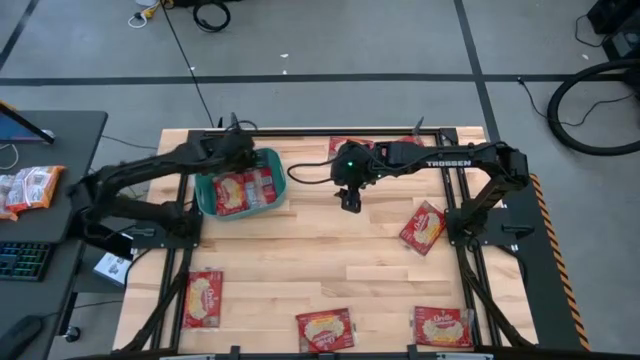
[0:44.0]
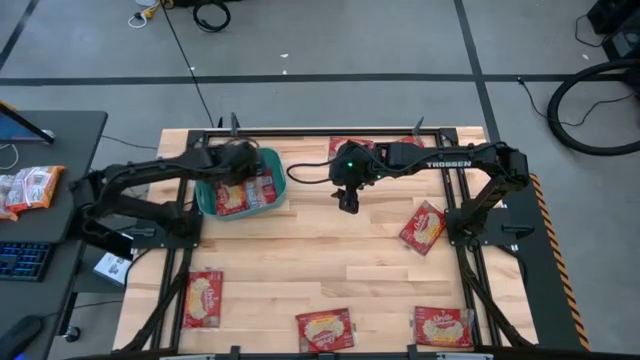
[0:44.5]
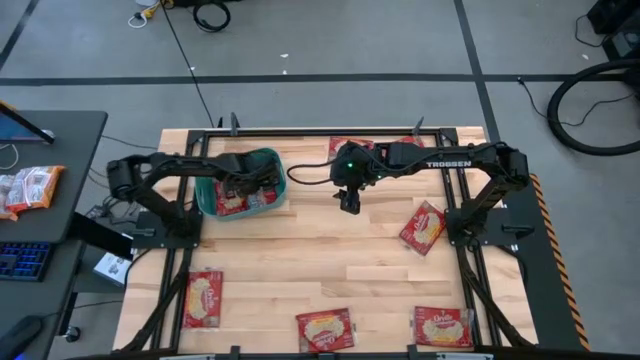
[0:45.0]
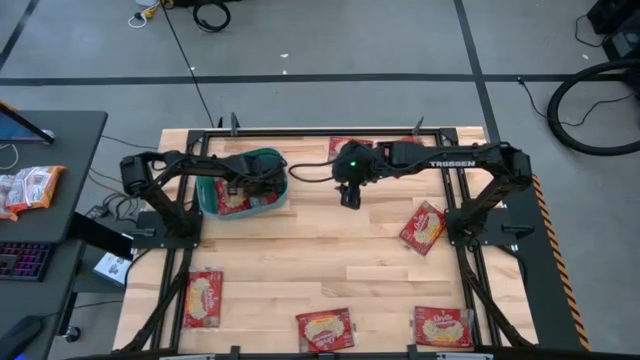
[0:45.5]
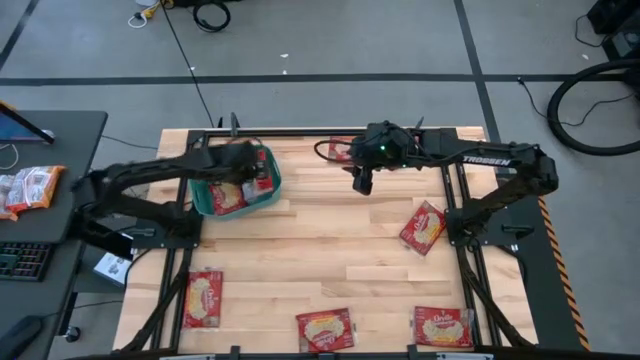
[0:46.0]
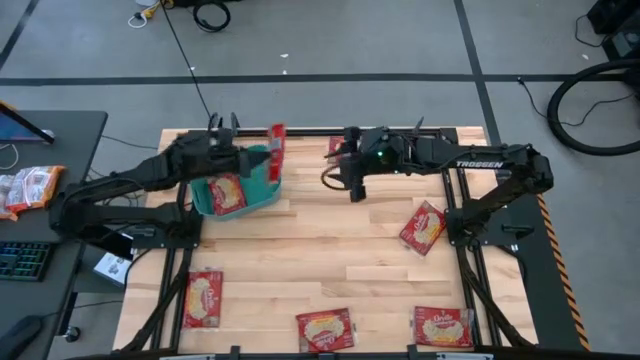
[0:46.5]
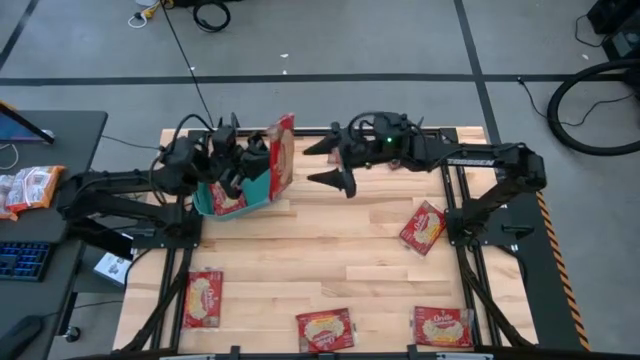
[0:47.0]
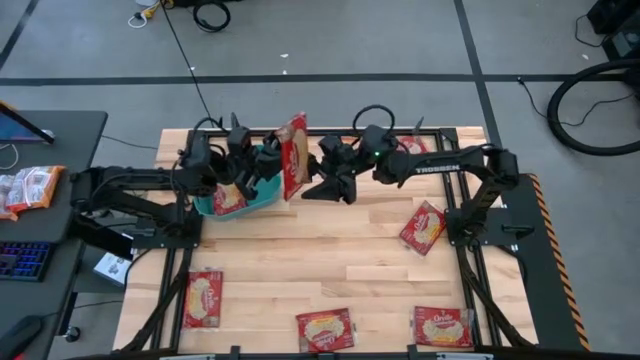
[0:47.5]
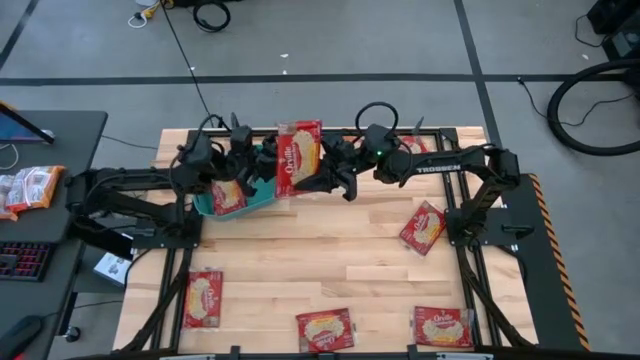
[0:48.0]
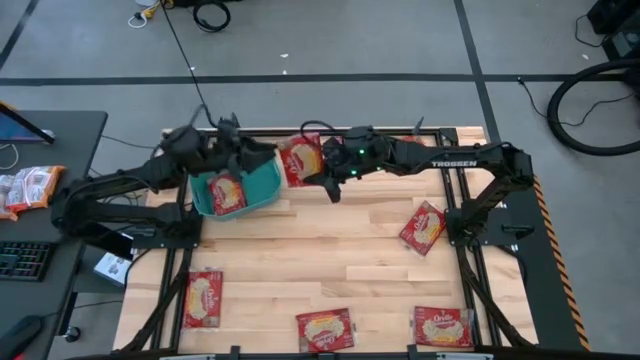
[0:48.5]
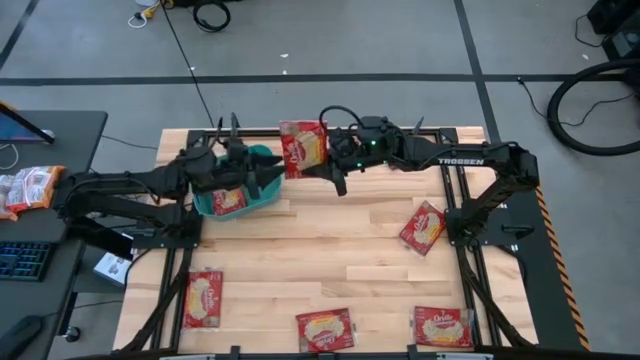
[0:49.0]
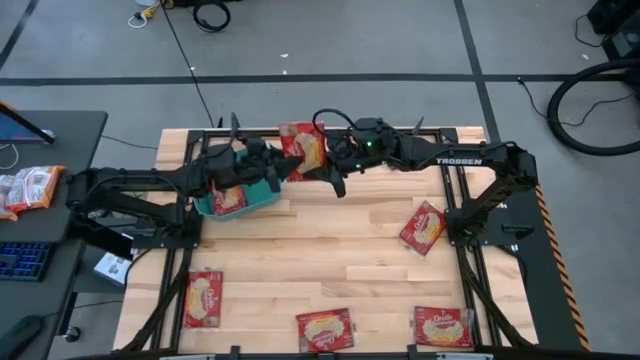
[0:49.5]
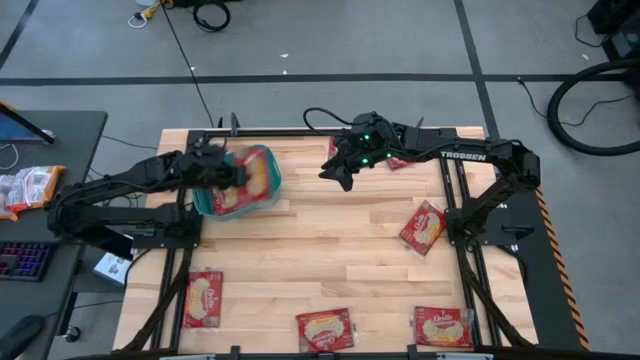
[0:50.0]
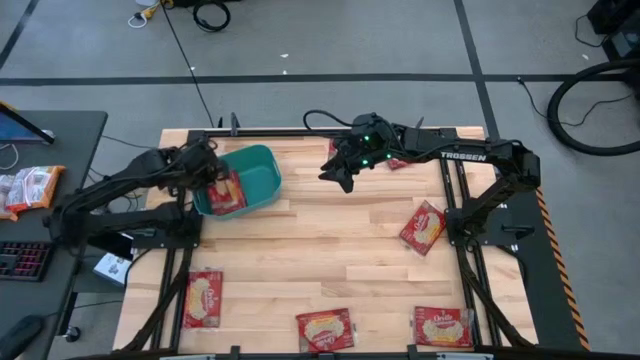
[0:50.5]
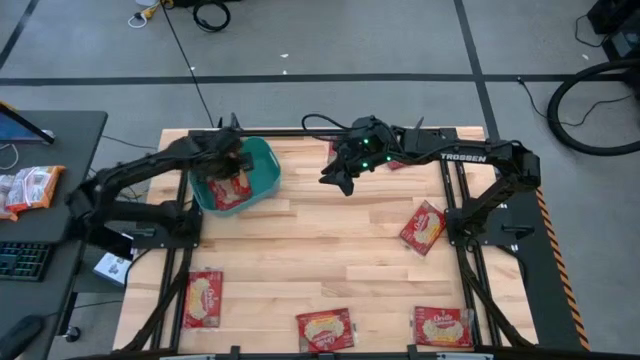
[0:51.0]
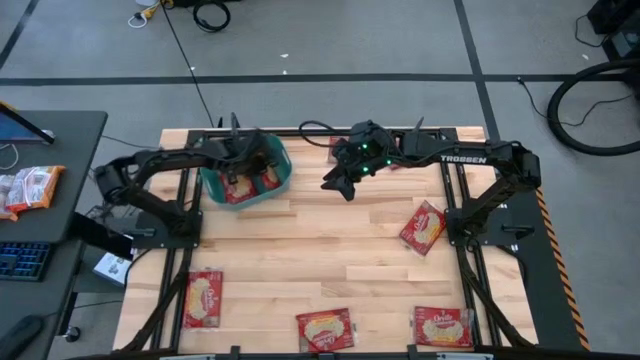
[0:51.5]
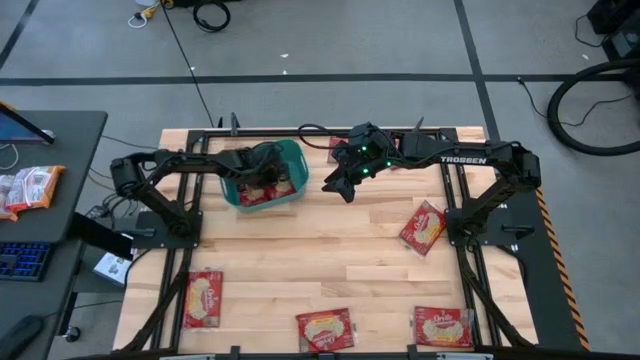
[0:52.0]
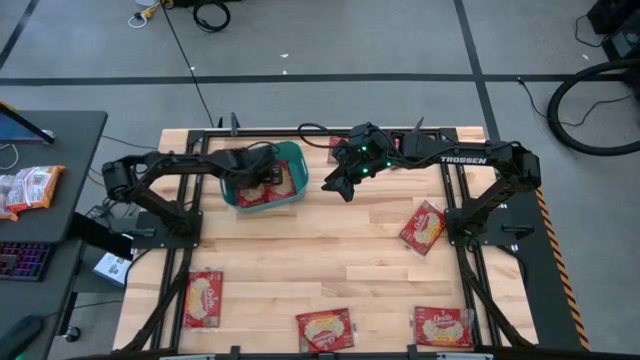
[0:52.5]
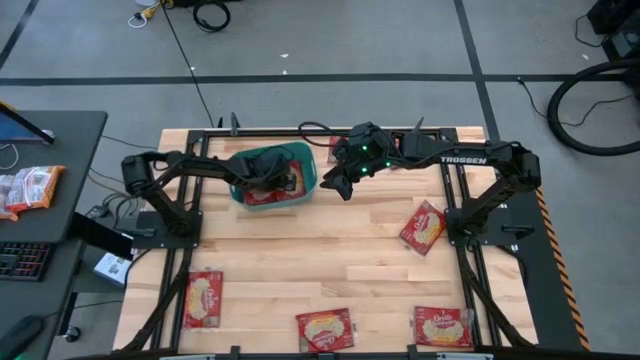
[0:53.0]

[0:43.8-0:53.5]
Task: Sort popcorn bags into baskets
Adjust the popcorn bag in the green bin

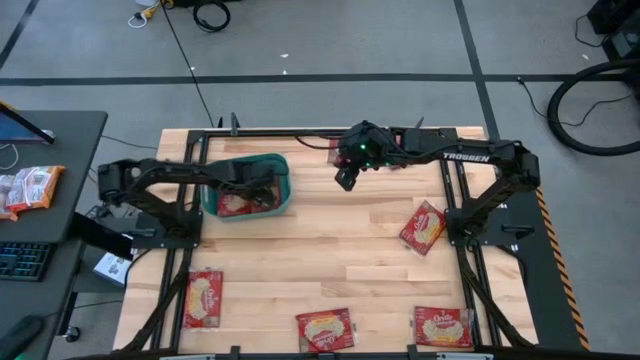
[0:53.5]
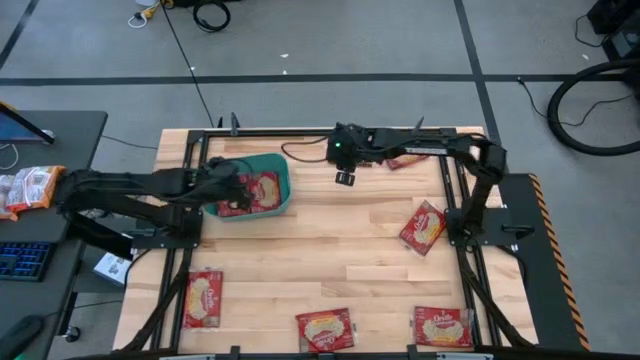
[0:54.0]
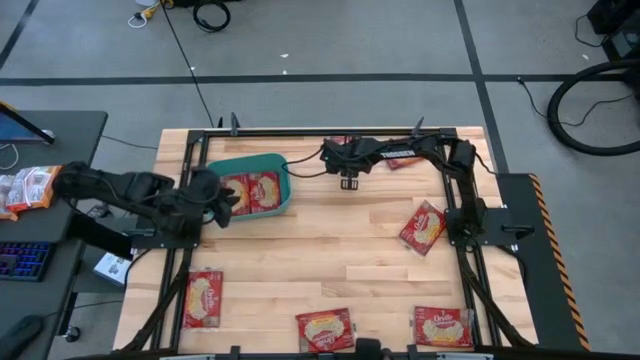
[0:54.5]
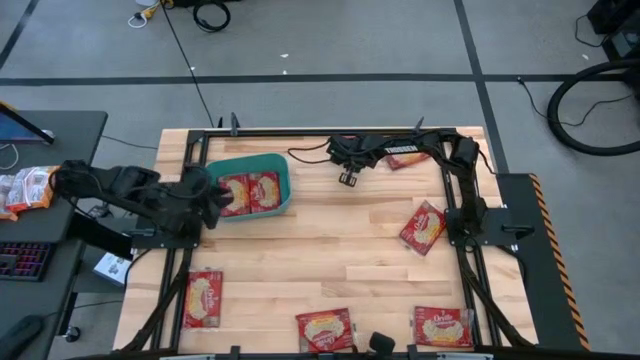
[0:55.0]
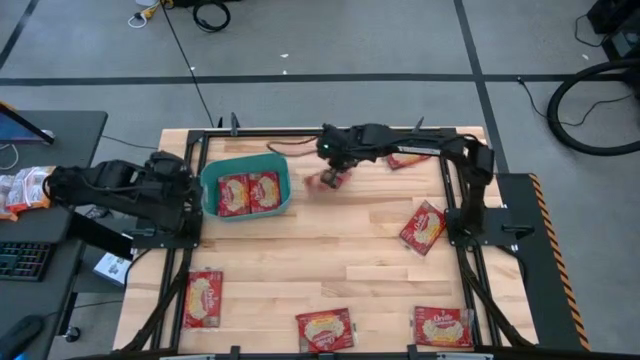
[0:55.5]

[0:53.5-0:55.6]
Put the popcorn bag into the green bin

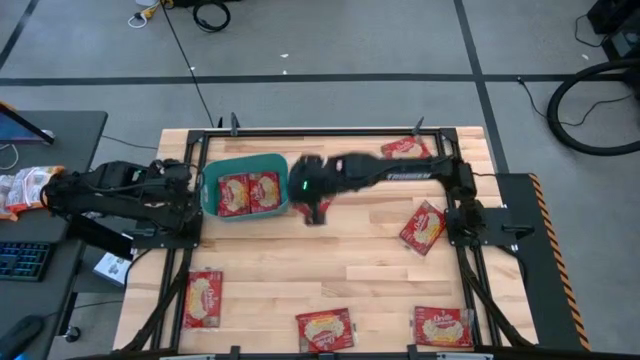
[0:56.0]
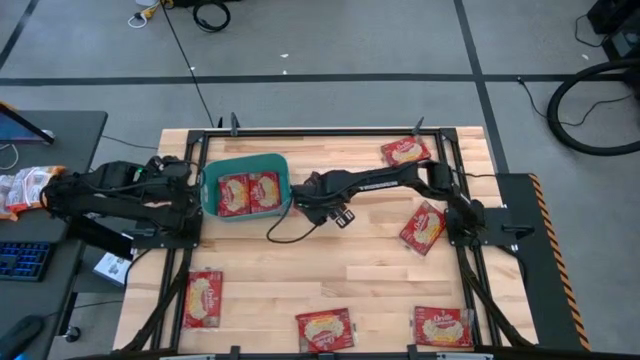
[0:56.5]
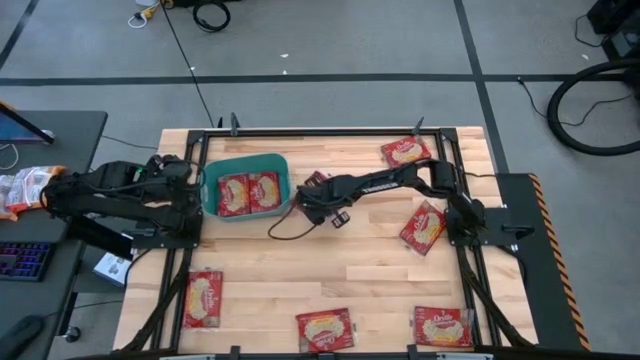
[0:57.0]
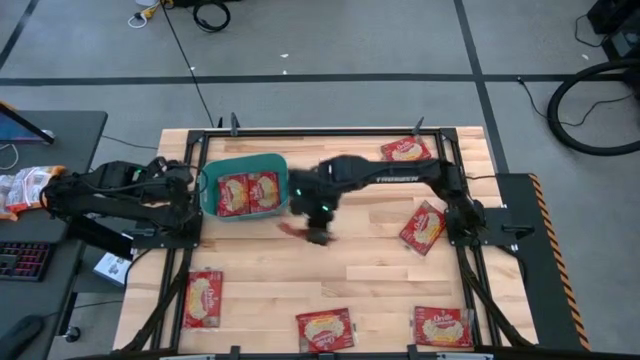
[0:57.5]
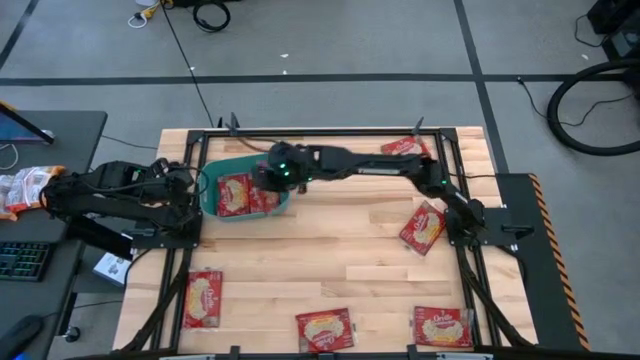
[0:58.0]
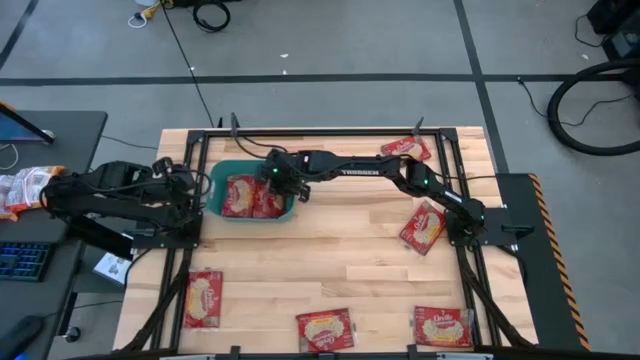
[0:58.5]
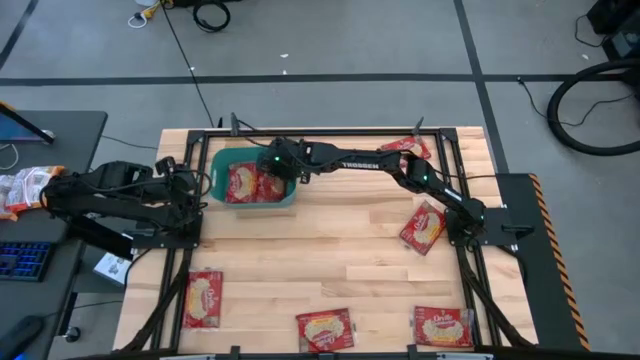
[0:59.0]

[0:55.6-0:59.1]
Put the popcorn bag into the green bin

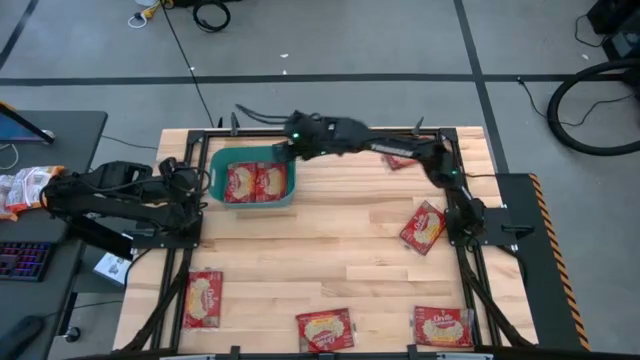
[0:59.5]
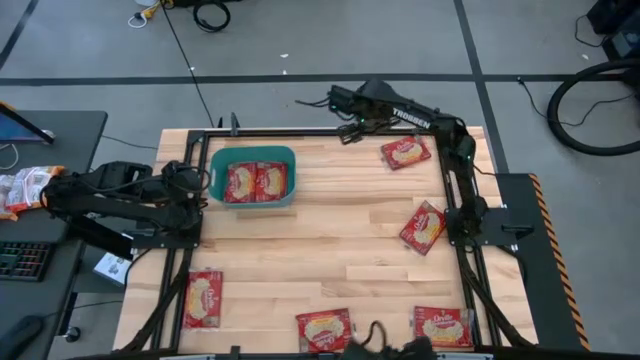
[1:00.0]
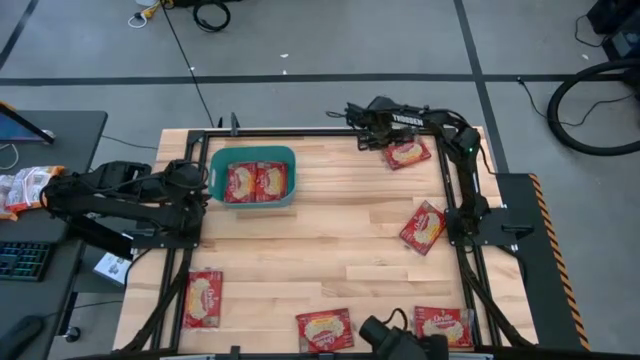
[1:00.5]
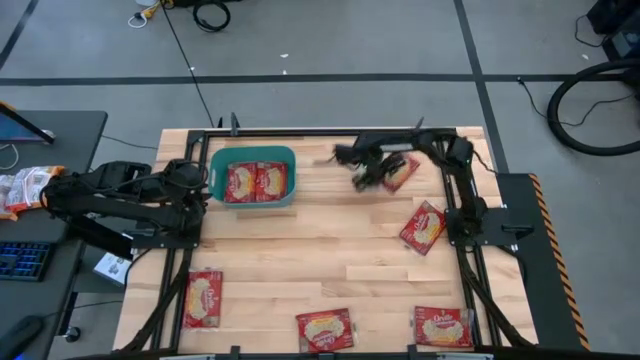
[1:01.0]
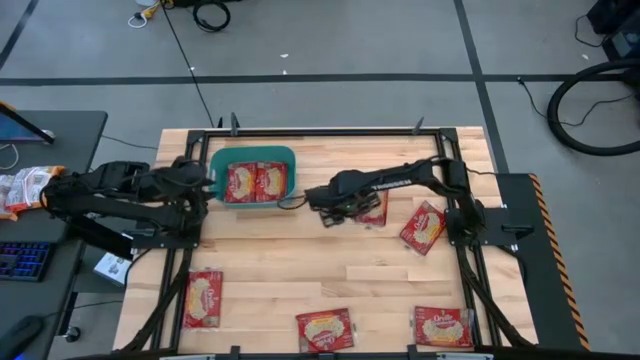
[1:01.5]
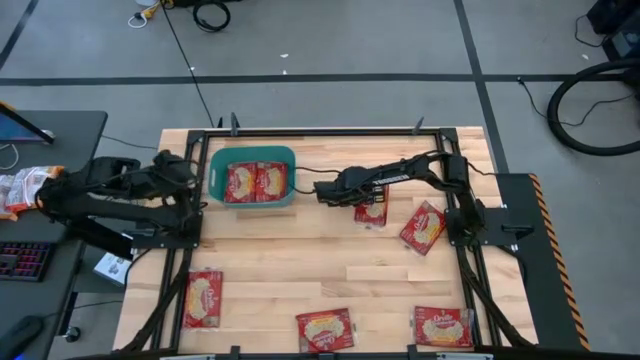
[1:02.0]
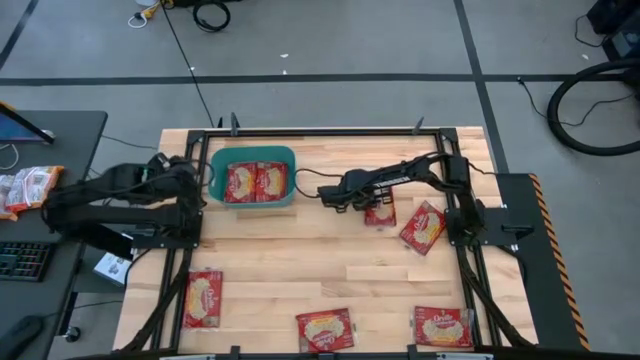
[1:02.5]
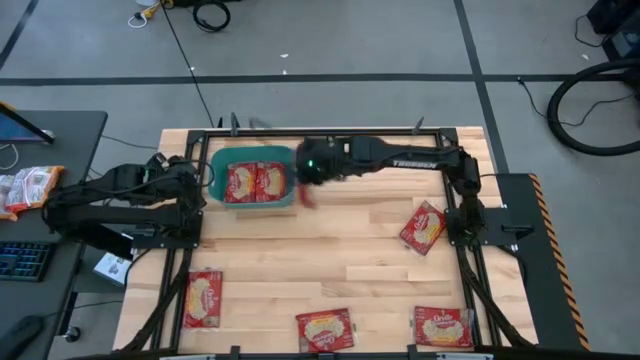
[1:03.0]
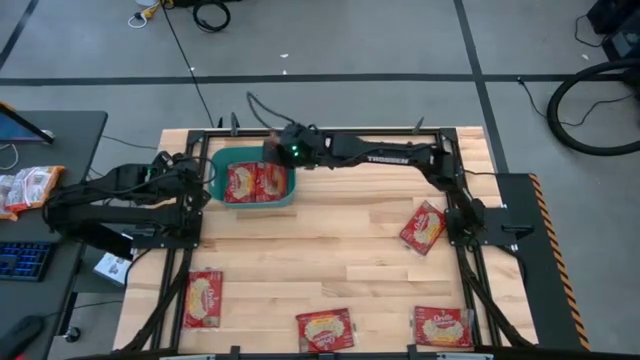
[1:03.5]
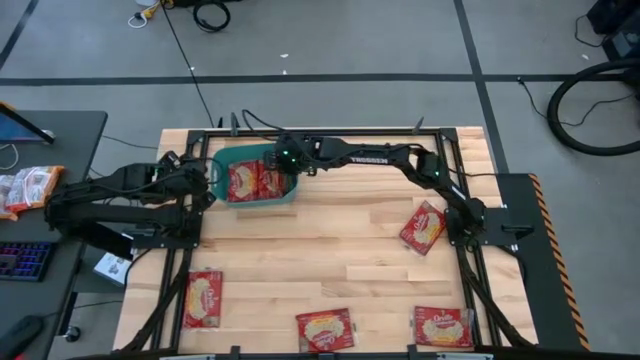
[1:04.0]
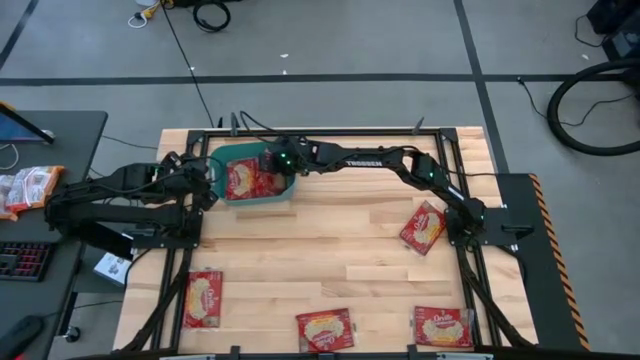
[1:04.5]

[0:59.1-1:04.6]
Put the popcorn bag into the green bin

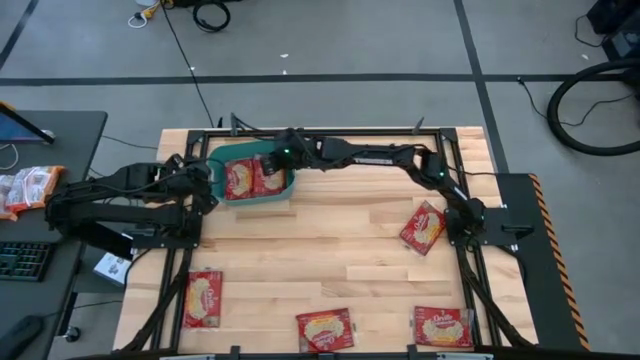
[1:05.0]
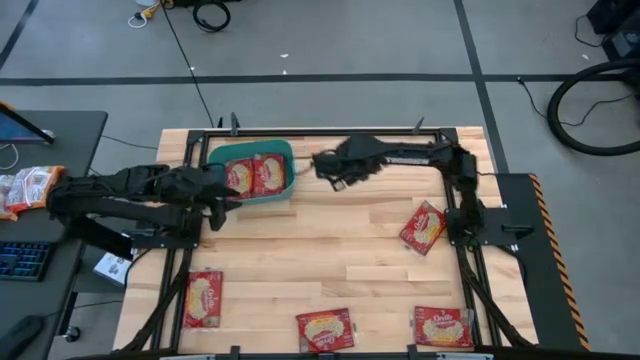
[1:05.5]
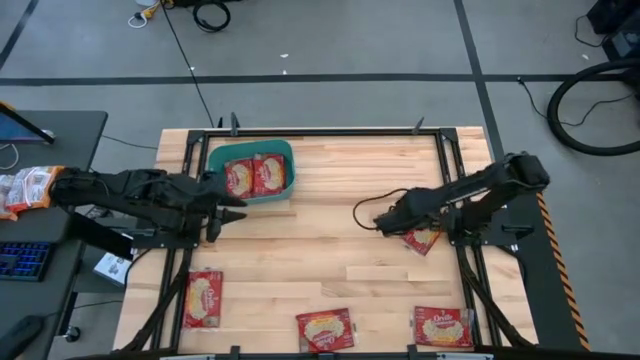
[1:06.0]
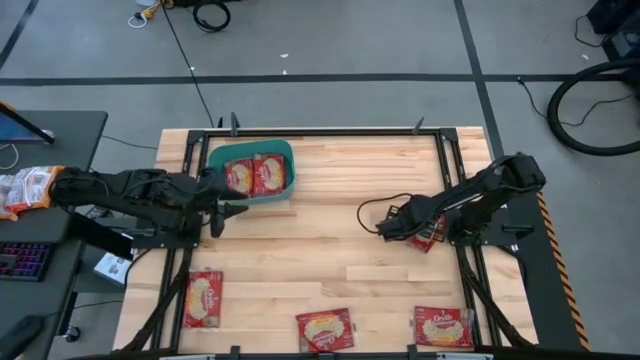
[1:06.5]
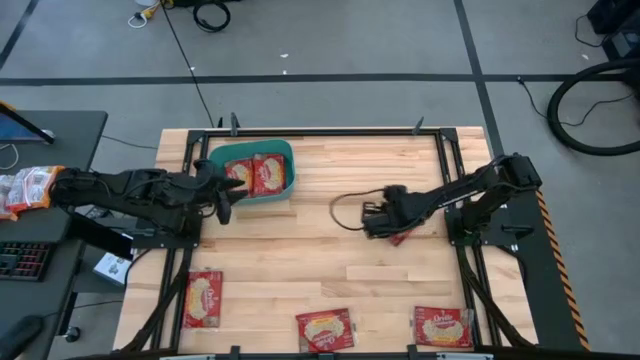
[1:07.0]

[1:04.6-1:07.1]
Put the popcorn bag into the green bin
